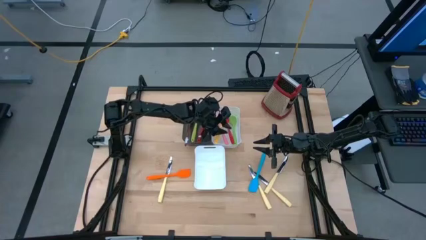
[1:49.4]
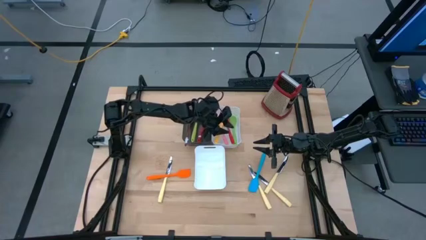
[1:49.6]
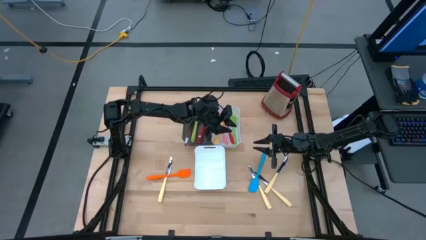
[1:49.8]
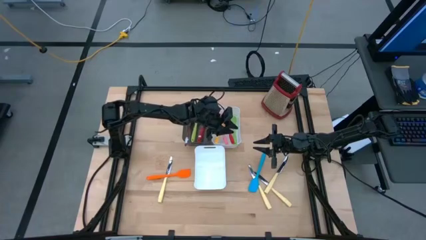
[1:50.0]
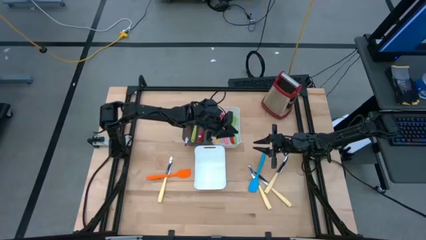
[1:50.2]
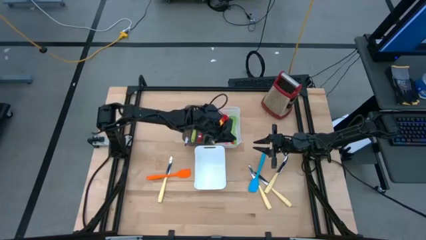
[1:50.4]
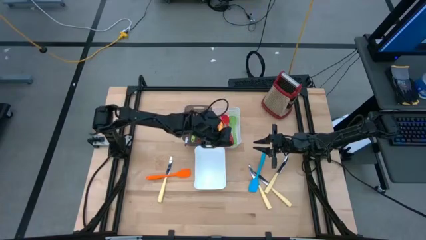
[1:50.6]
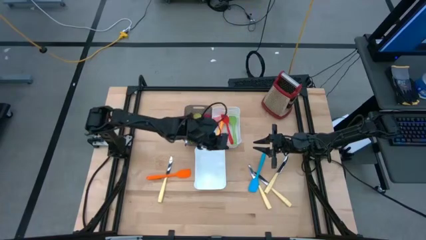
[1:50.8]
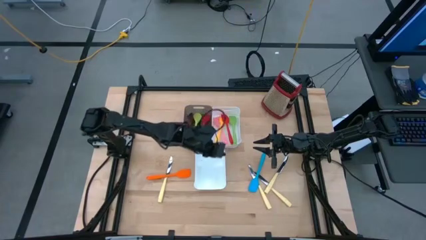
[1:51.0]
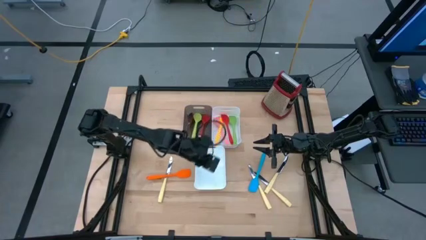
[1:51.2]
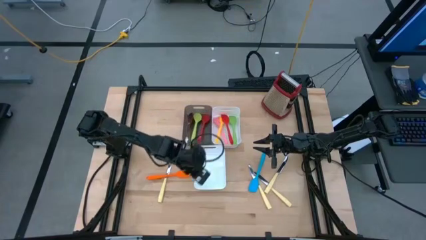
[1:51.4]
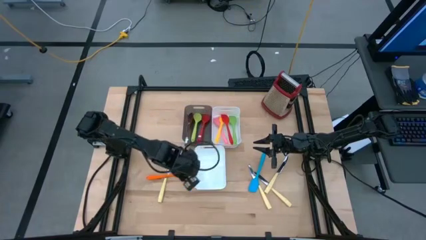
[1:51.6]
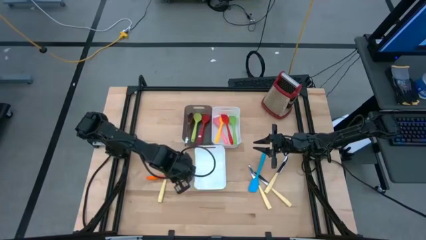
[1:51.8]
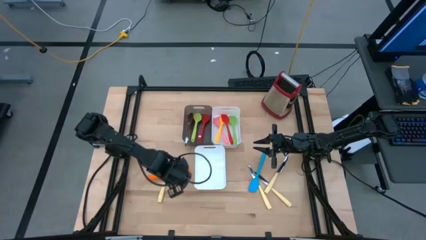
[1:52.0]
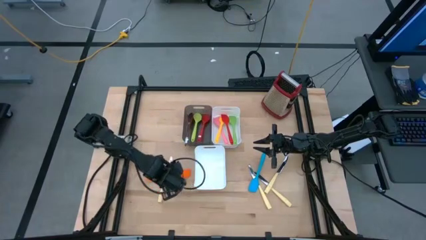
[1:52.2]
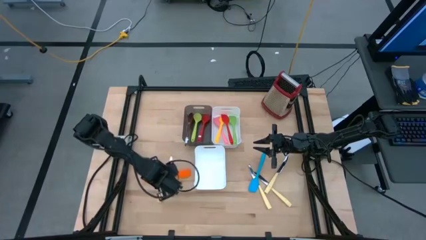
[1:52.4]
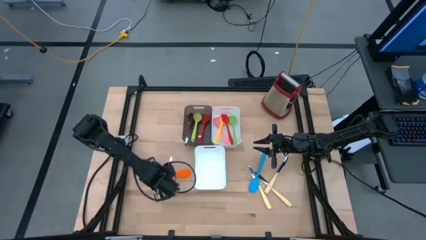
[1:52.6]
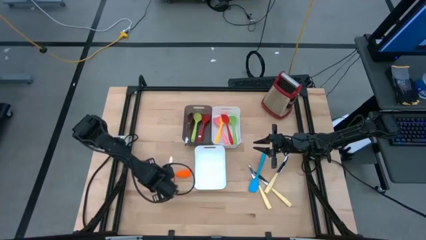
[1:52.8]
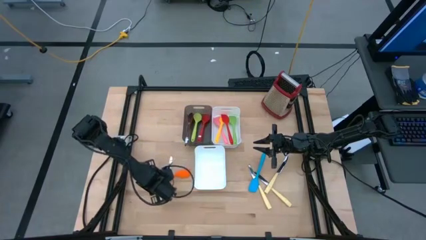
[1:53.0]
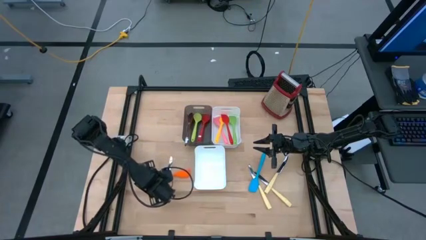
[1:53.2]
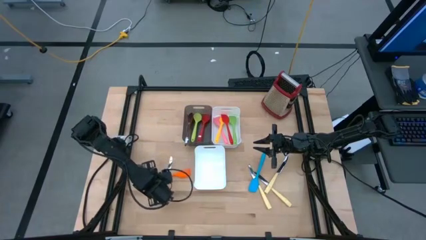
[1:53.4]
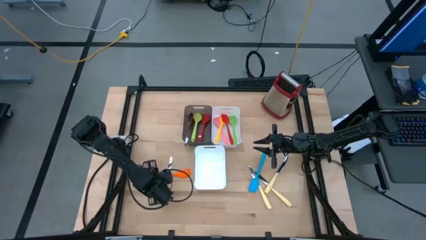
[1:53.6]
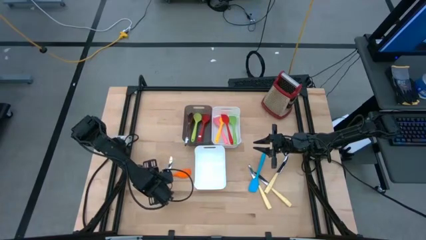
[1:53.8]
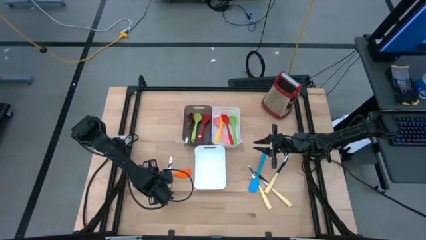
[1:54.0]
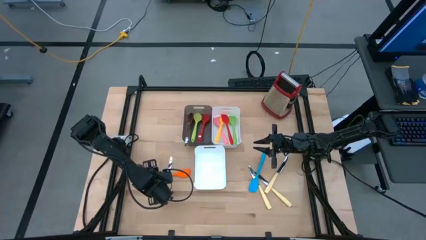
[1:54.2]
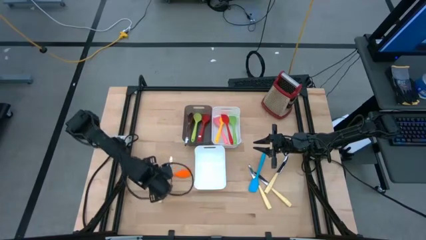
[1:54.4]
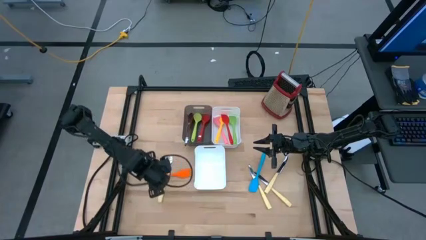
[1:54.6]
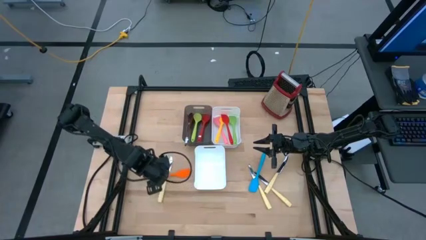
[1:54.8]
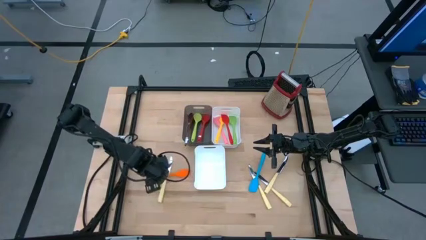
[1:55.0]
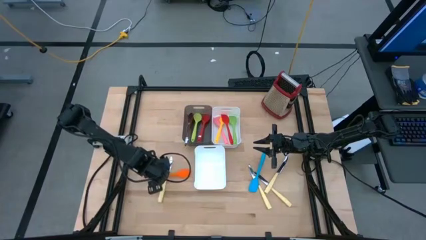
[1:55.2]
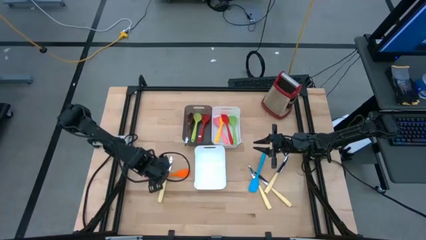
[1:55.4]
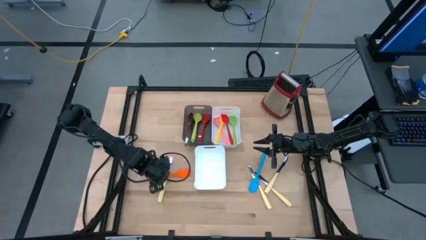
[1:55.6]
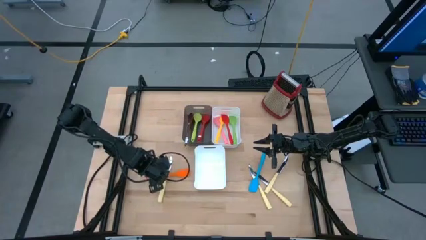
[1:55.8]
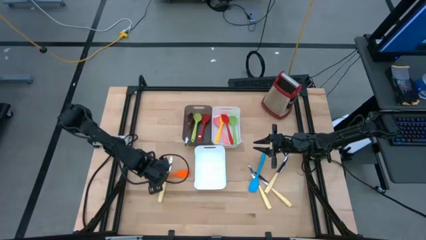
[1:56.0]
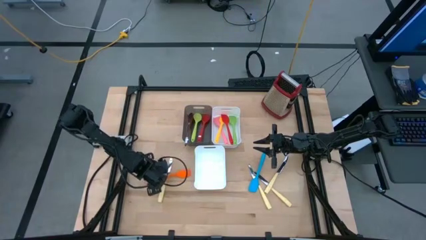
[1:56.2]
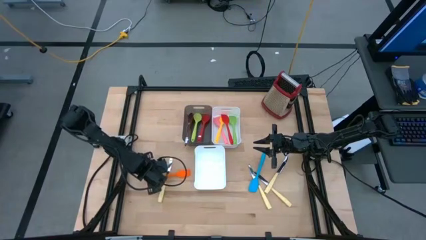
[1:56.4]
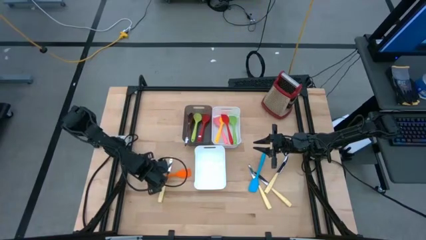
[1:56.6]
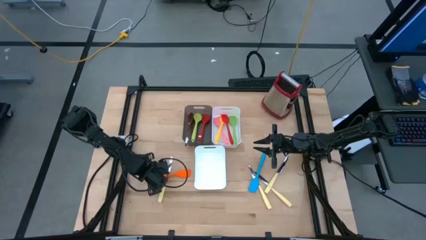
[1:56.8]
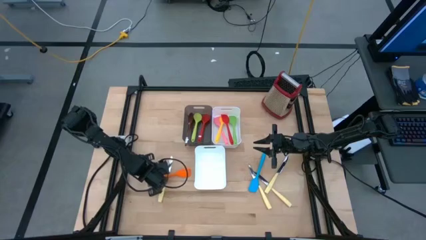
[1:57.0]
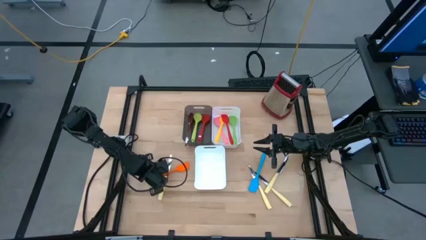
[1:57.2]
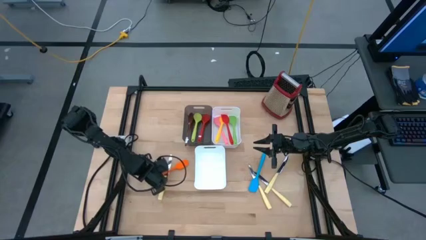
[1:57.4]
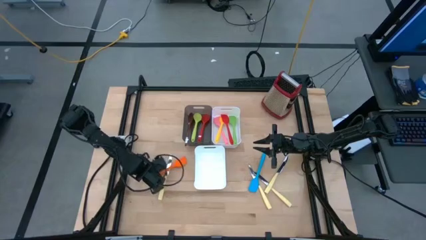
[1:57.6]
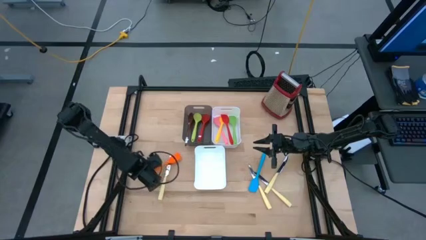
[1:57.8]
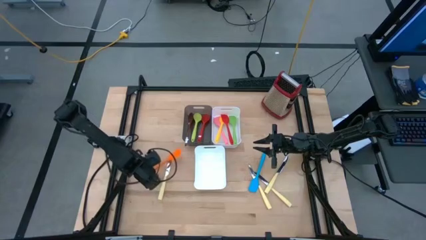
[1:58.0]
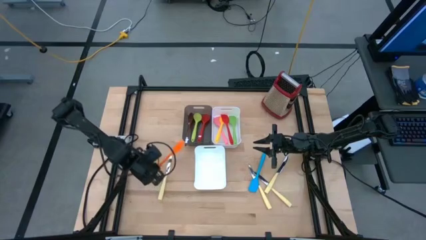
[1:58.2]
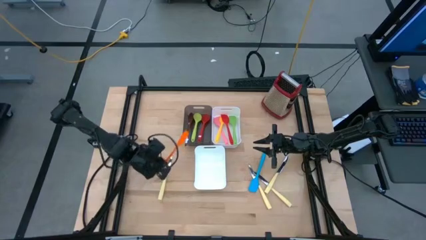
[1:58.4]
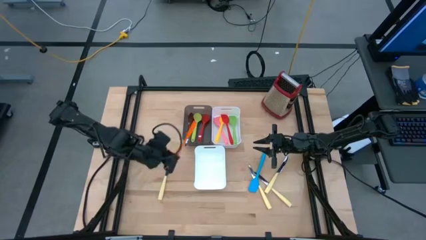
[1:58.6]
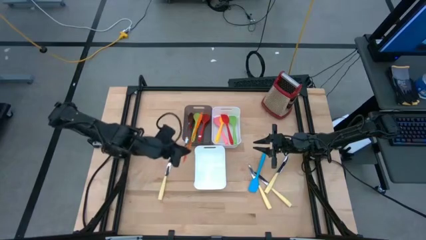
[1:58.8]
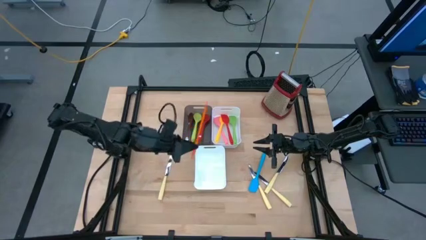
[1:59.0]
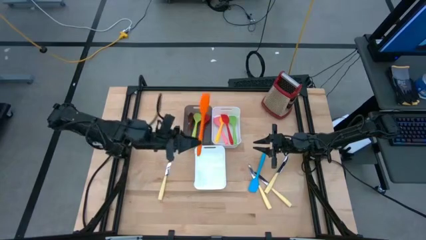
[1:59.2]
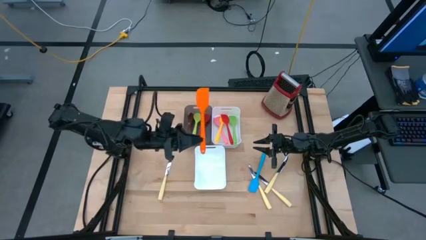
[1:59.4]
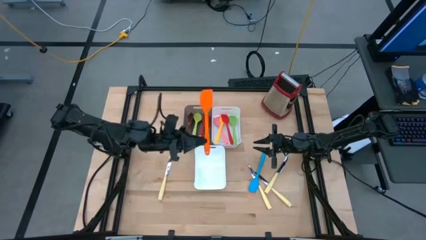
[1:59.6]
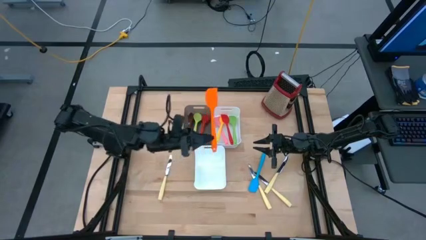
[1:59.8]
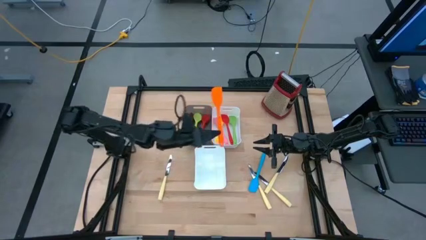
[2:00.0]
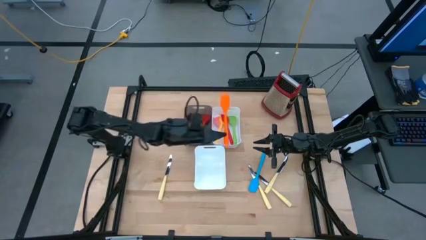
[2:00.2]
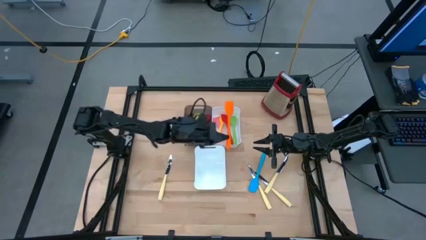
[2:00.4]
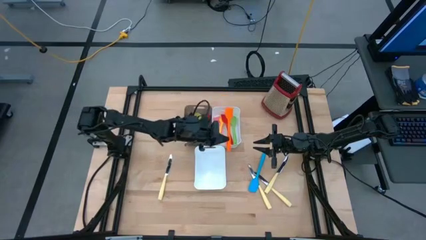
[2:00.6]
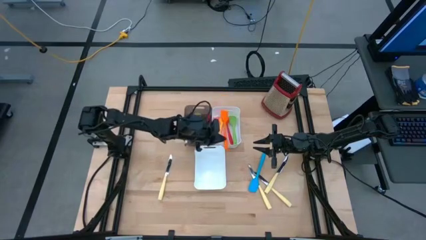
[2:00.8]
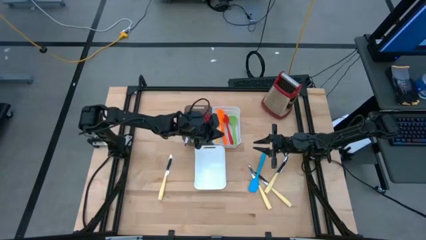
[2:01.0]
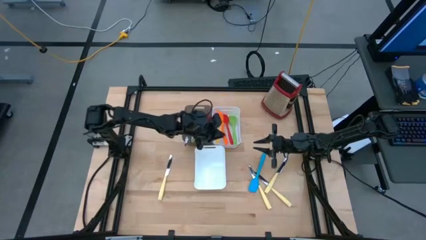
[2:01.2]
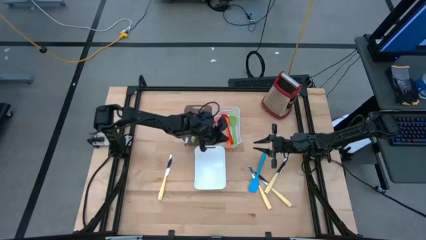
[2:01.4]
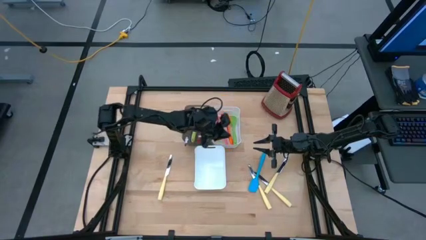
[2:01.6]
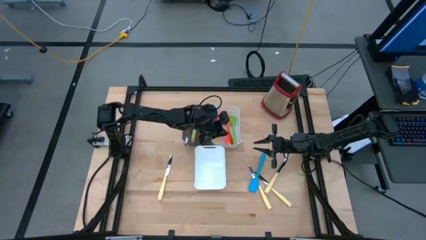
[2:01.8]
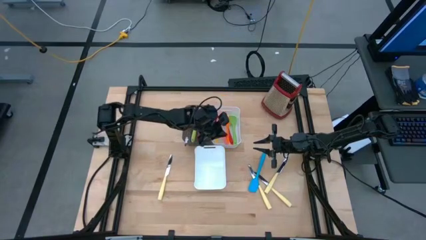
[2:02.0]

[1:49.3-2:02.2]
Task: Pick & Place Kitchen Items
Put the orange spatula into the top white bin
